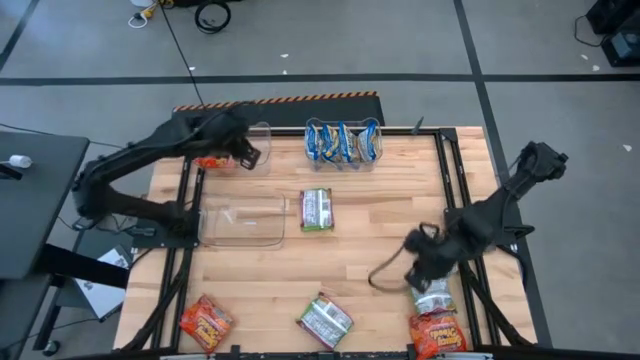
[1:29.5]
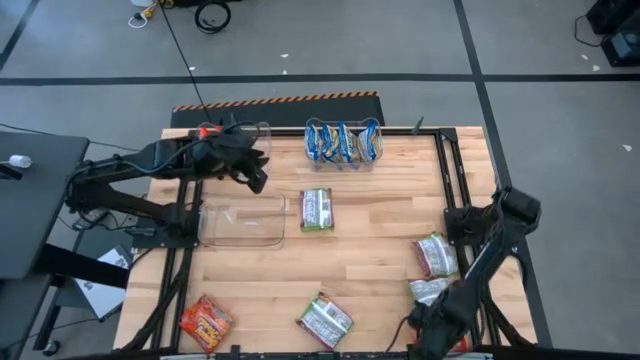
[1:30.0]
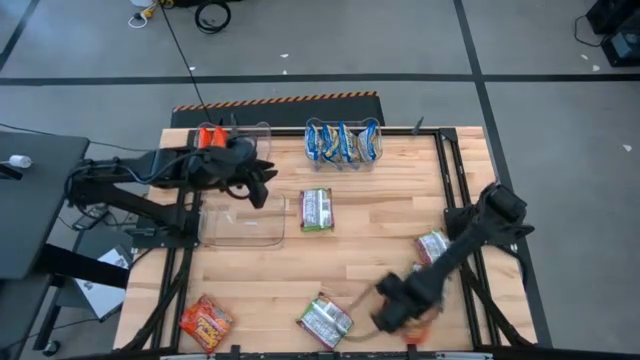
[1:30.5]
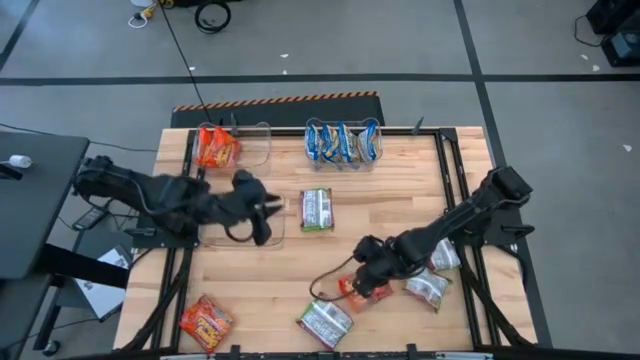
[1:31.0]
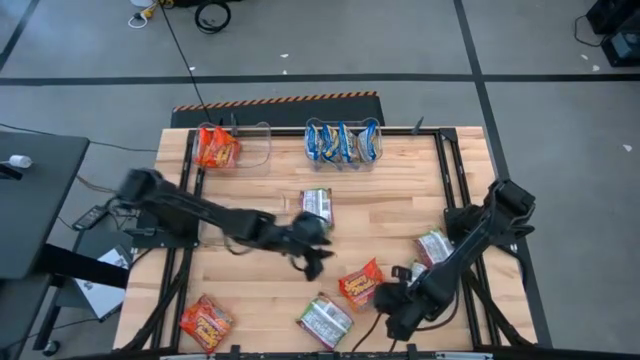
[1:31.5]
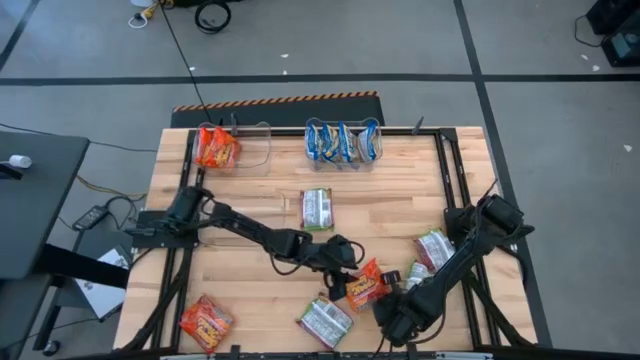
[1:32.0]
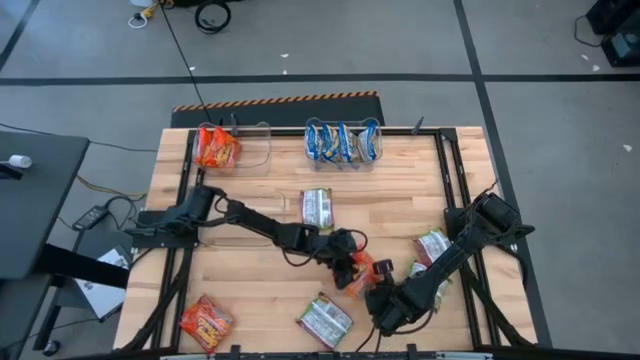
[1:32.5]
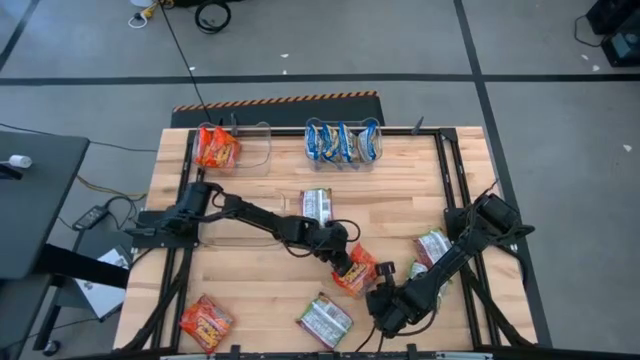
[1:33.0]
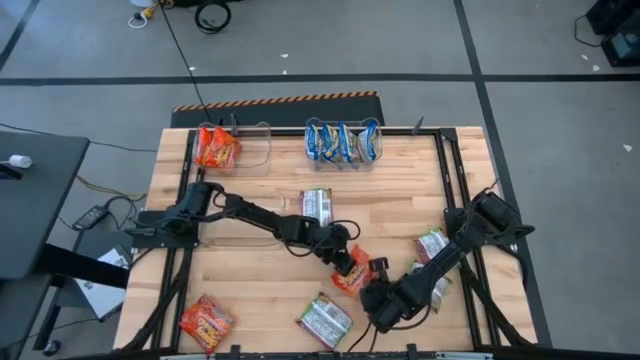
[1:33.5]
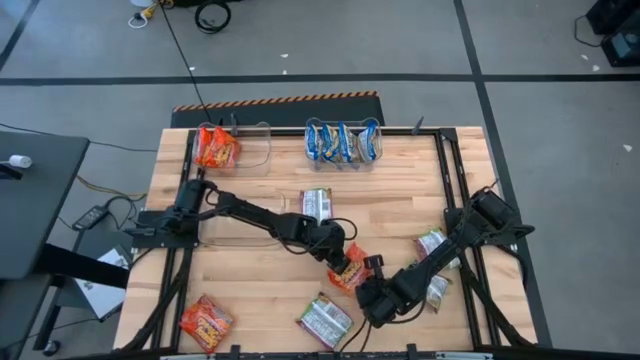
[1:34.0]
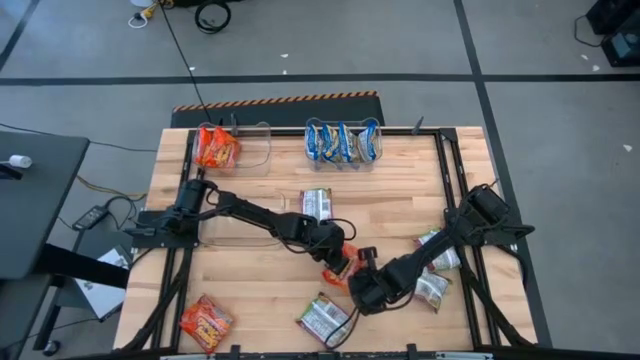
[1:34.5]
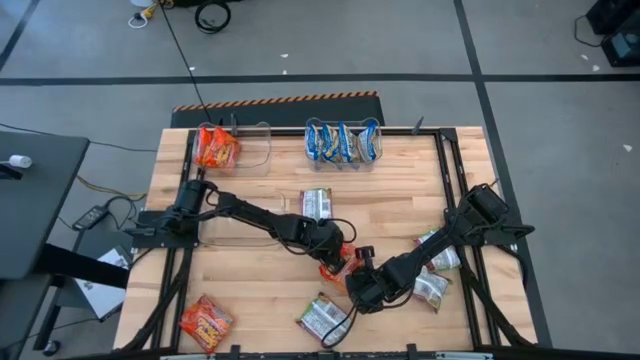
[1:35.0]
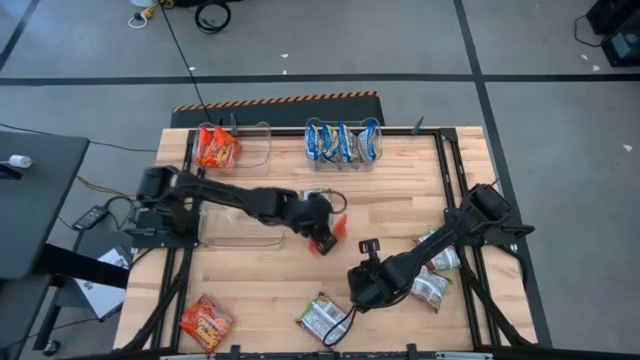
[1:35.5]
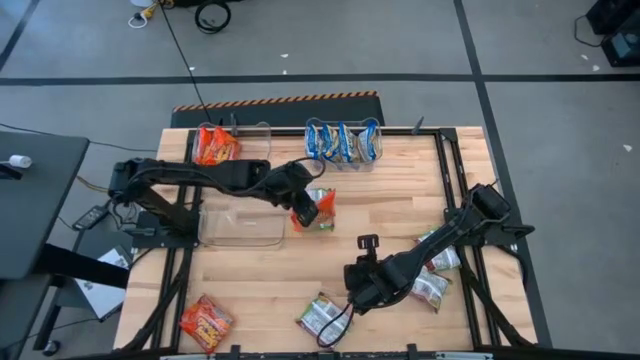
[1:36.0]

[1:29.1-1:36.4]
Task: Sort Maruchan noodles
Put the orange noodle pack into the top left transparent bin

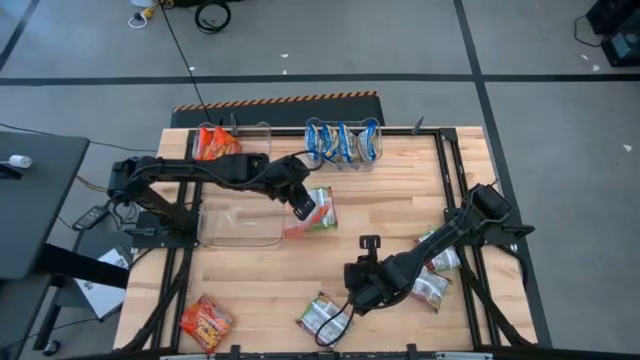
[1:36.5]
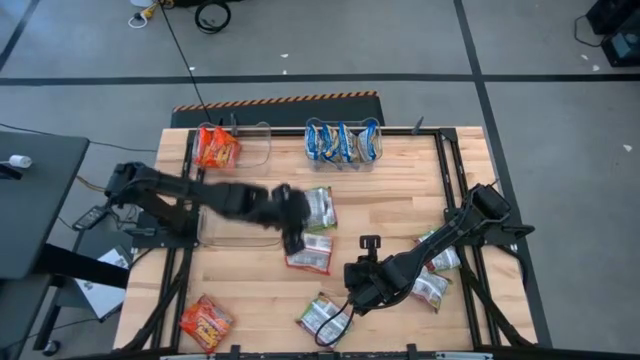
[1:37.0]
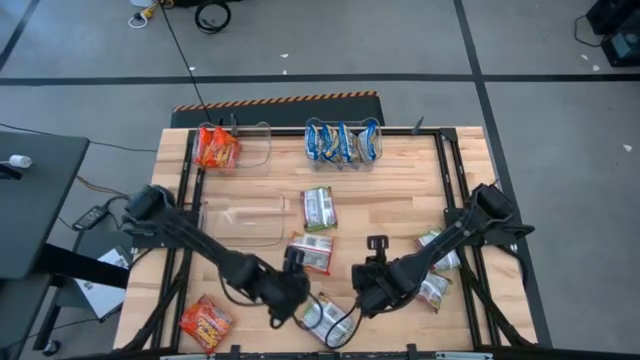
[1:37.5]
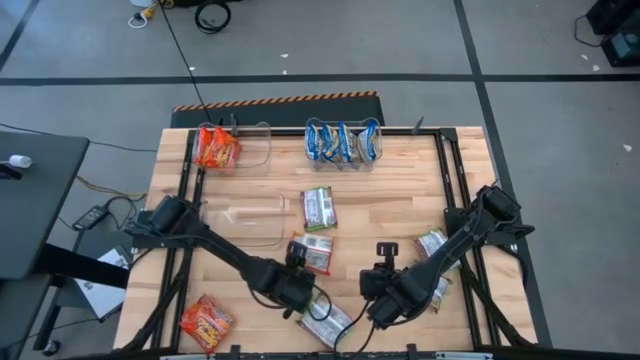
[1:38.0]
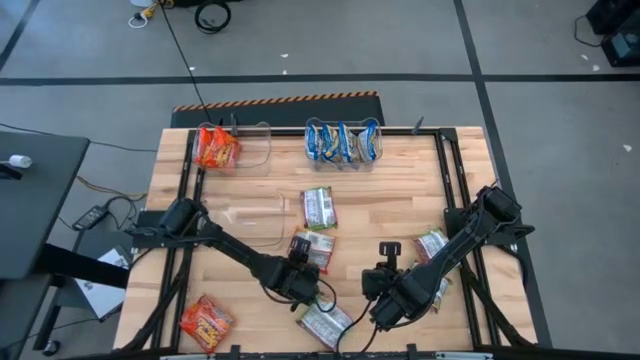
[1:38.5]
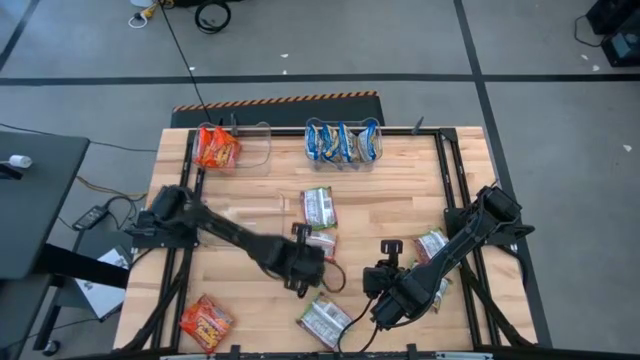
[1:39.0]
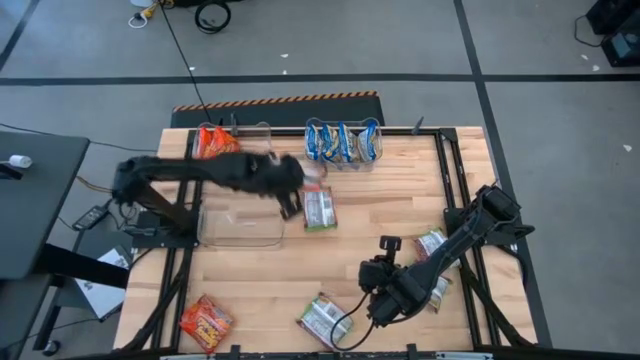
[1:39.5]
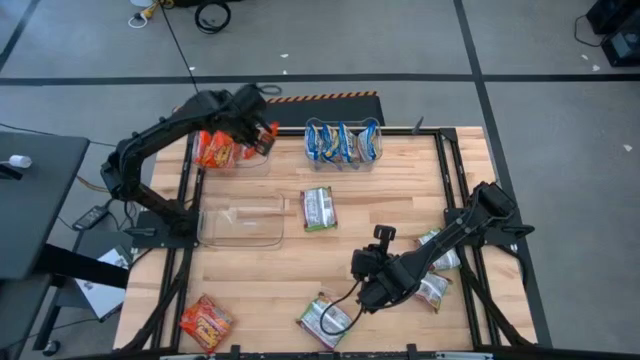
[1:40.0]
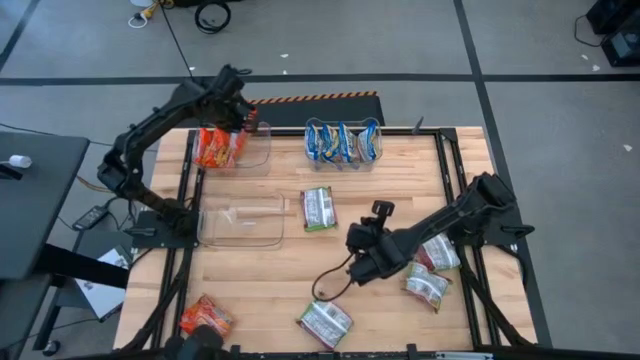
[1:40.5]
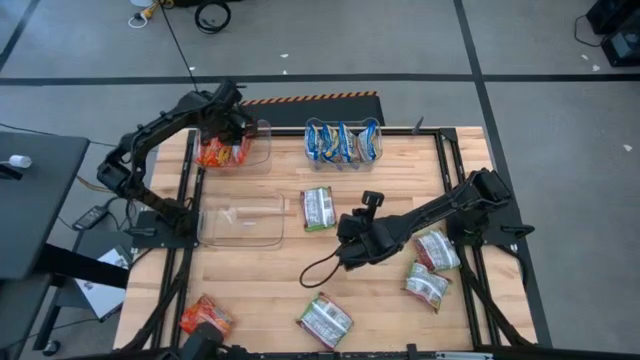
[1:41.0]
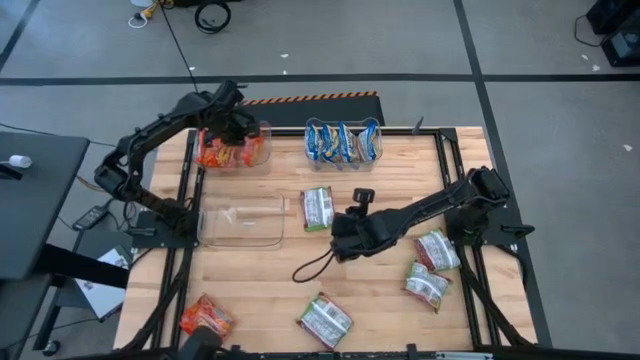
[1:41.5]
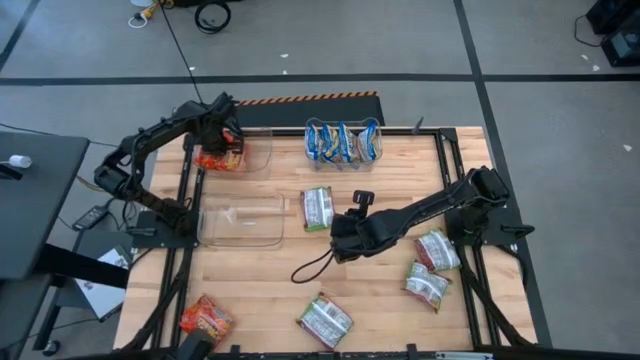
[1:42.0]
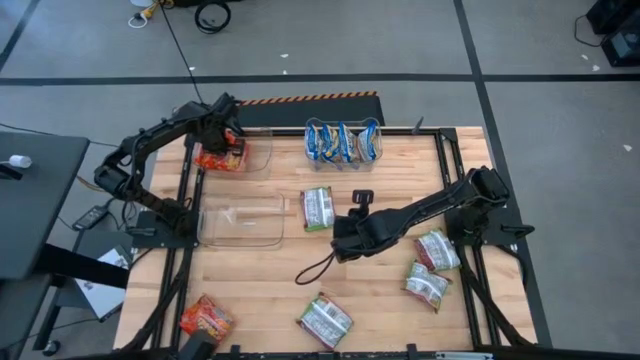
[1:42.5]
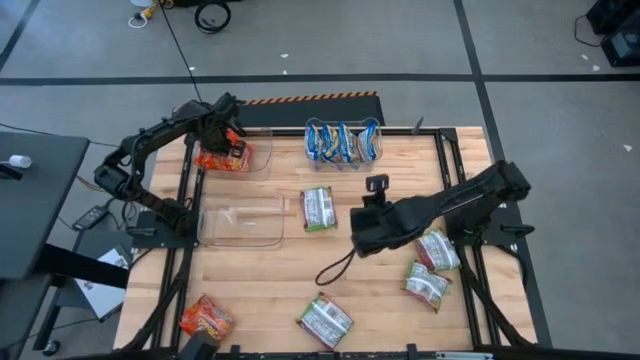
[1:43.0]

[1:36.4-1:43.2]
Put the orange noodle pack into the top left transparent bin

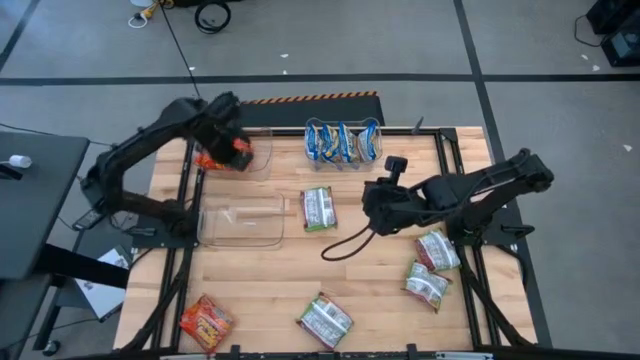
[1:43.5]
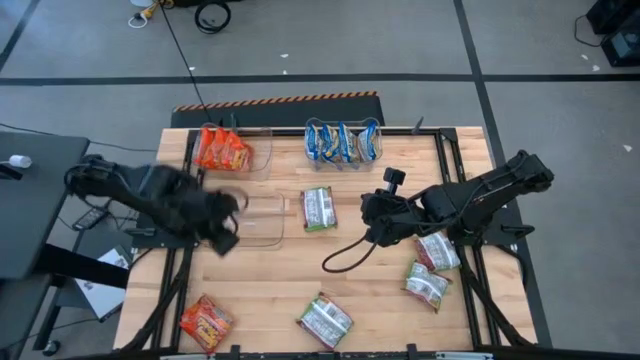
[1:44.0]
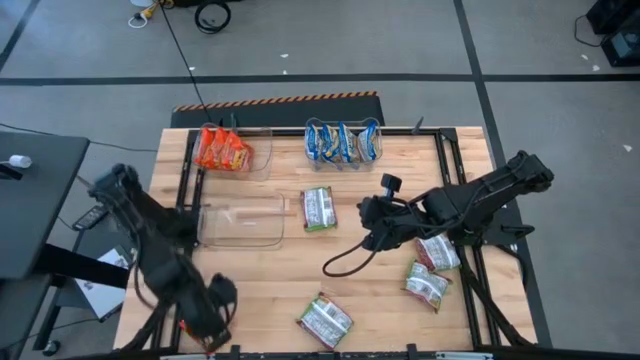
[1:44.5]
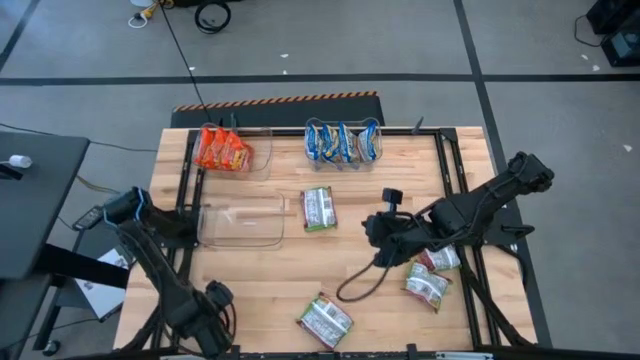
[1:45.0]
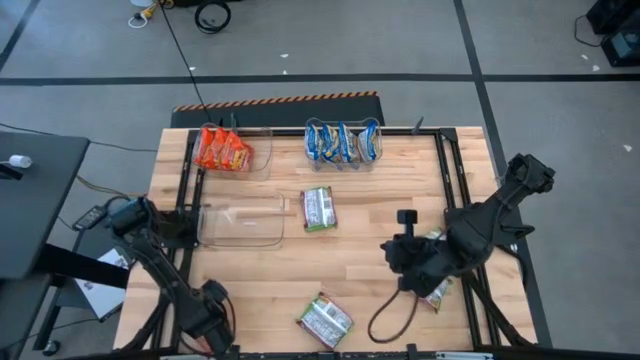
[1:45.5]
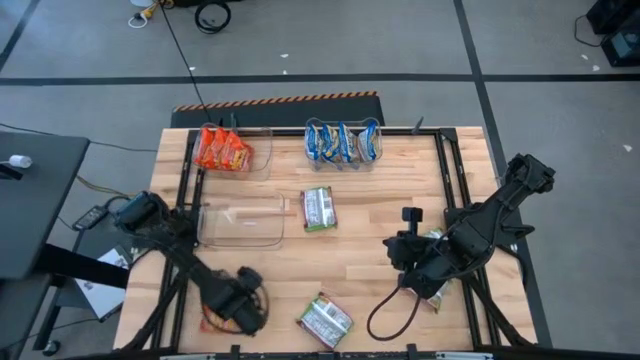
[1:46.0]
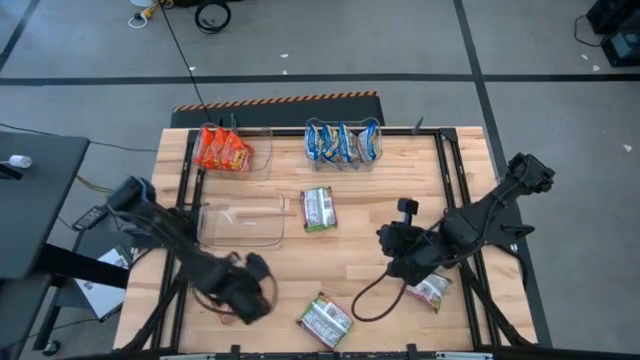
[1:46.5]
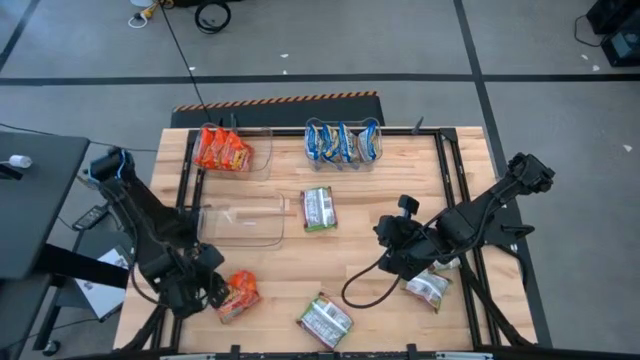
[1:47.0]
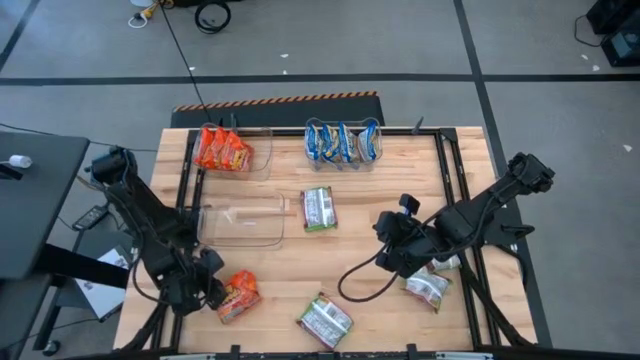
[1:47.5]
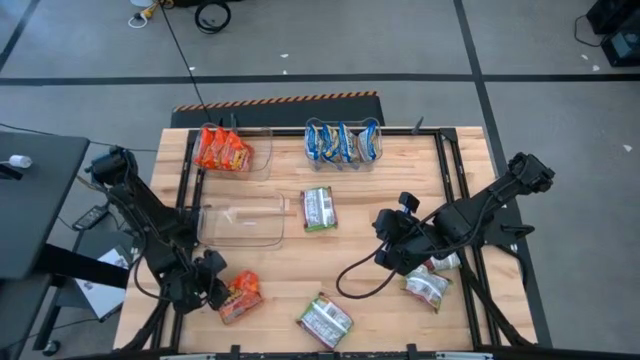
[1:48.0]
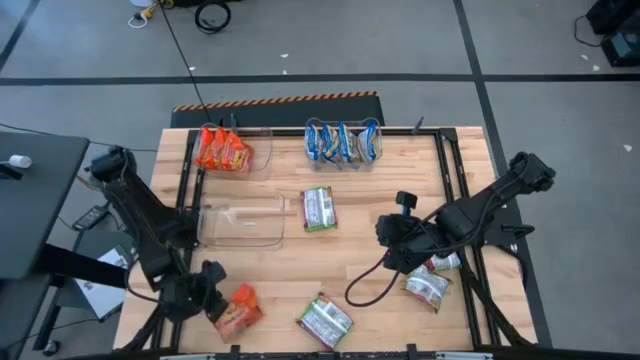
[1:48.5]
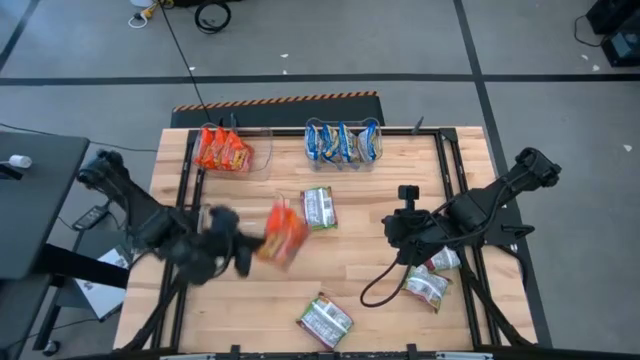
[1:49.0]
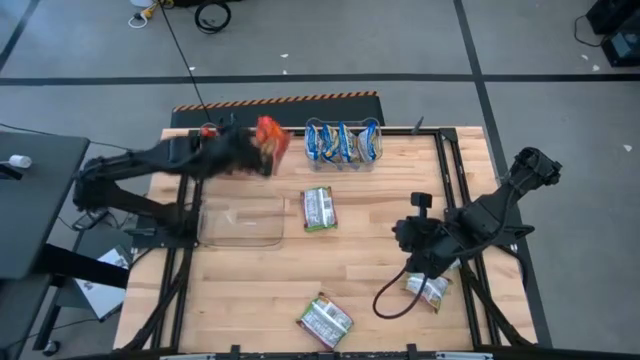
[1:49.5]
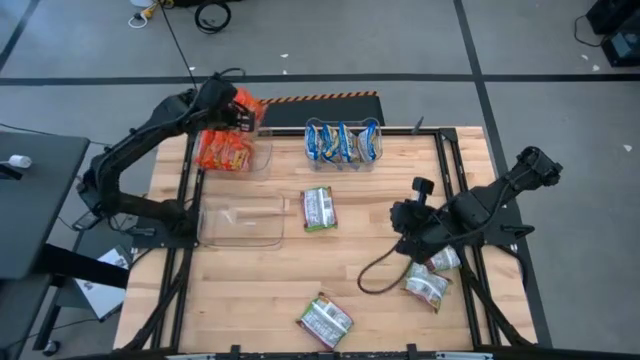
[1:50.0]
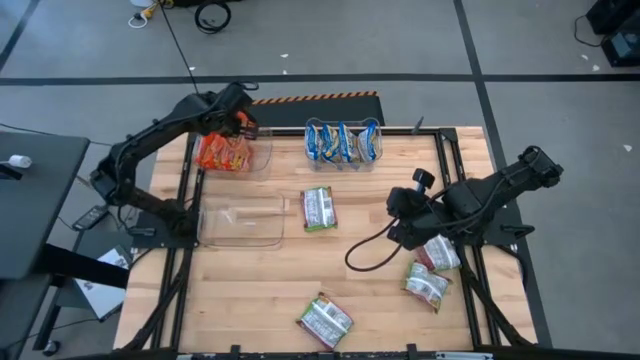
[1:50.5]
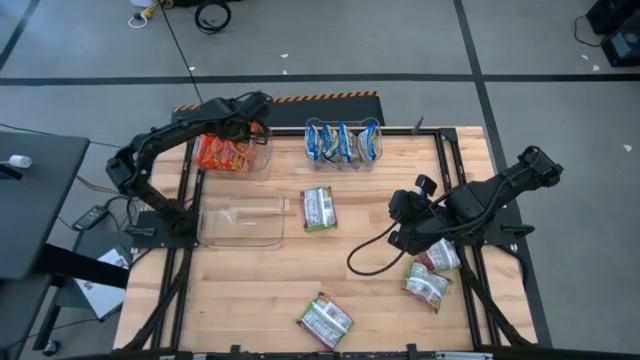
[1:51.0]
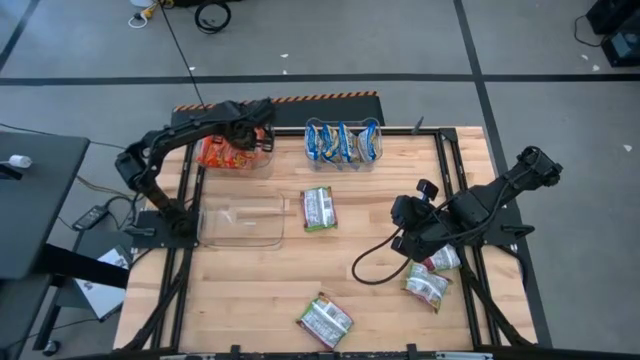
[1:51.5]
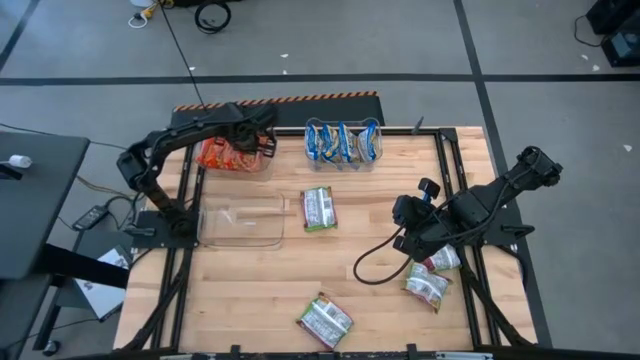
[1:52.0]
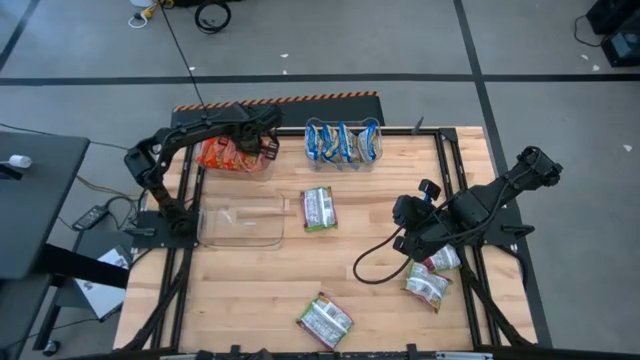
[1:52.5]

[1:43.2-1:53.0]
Put the orange noodle pack into the top left transparent bin
